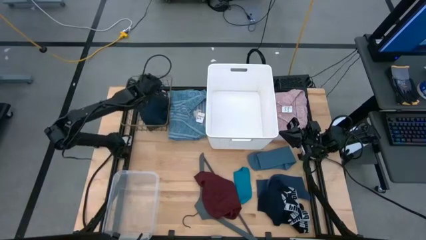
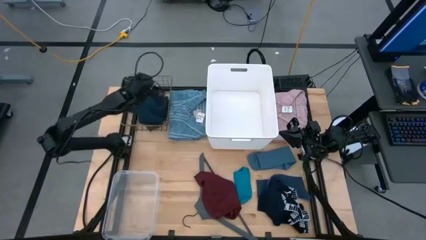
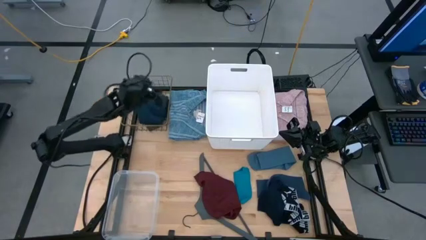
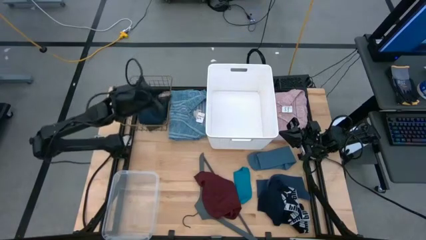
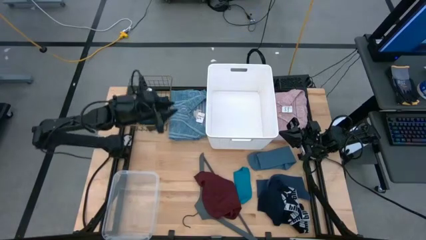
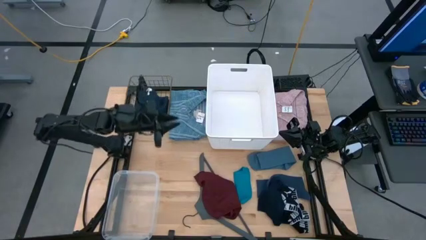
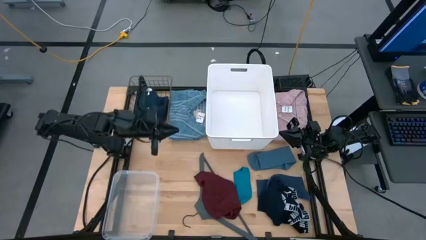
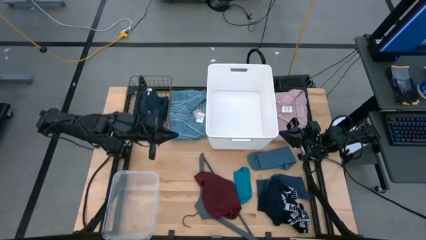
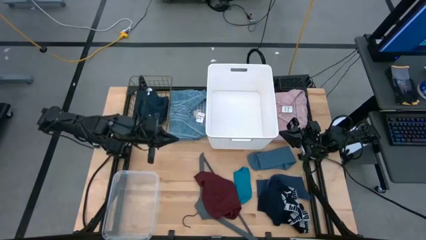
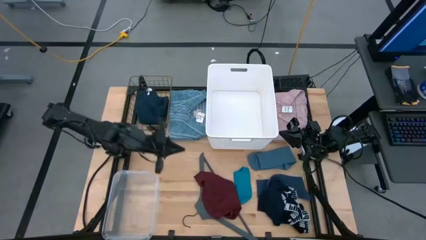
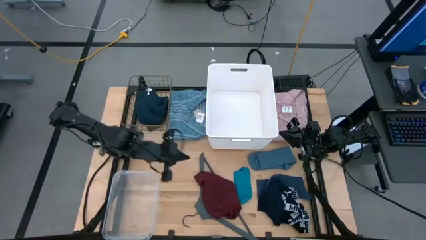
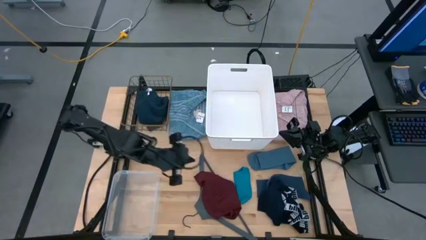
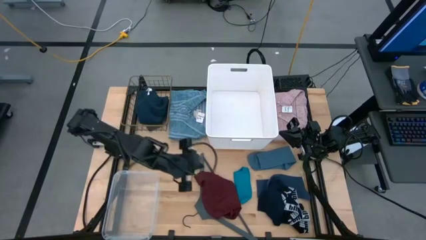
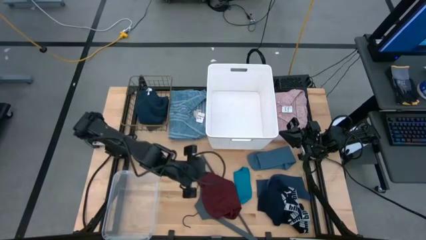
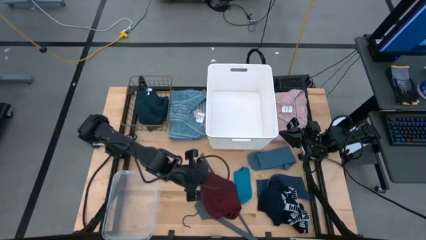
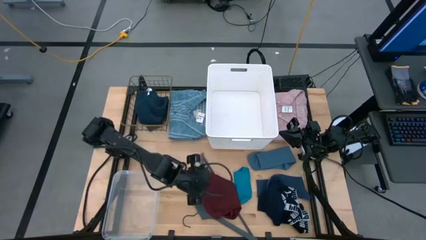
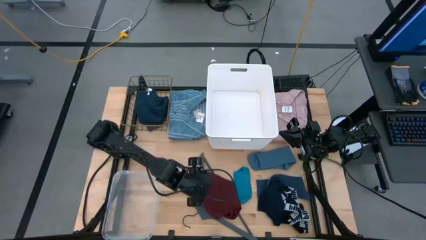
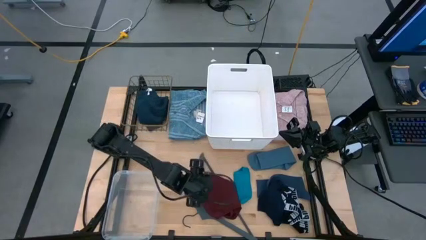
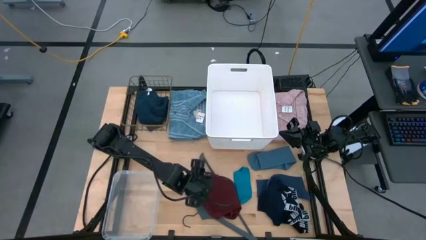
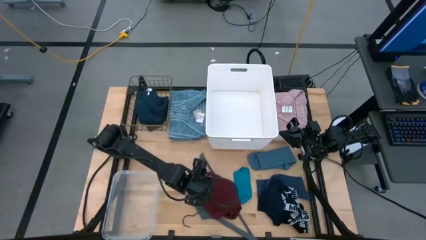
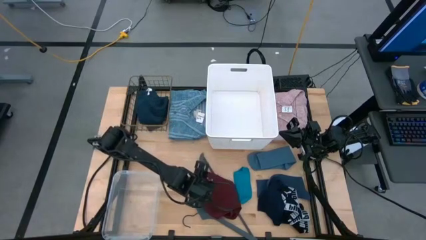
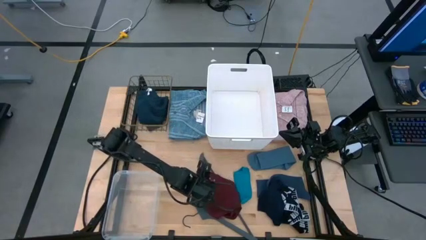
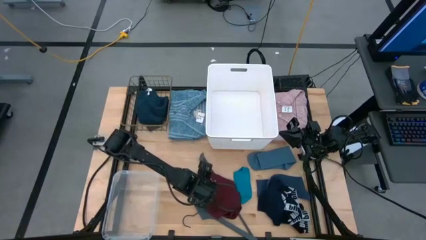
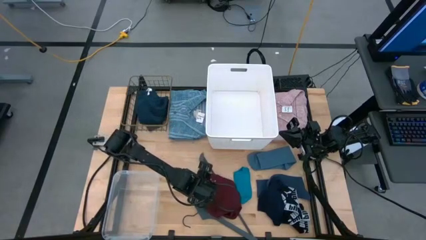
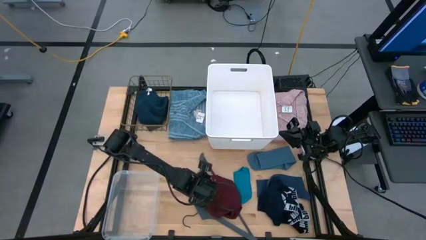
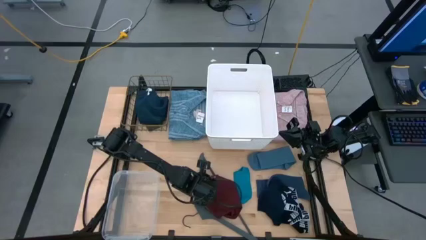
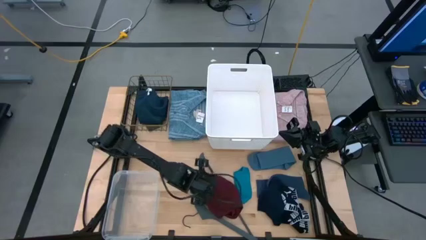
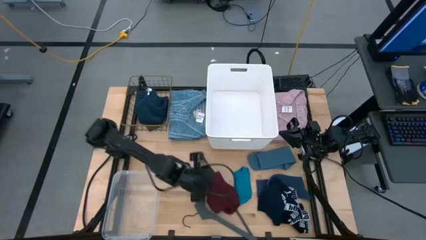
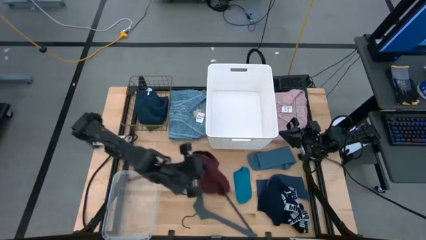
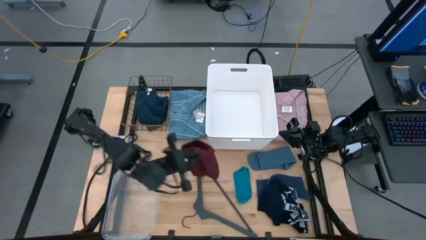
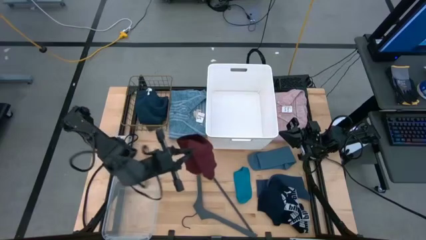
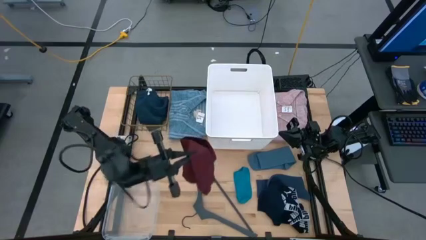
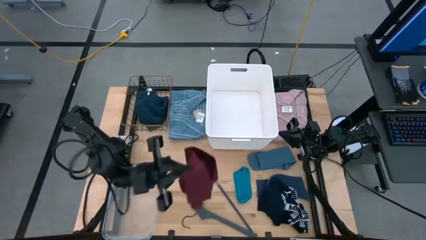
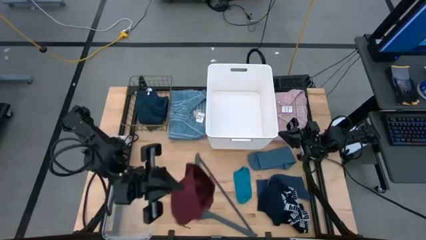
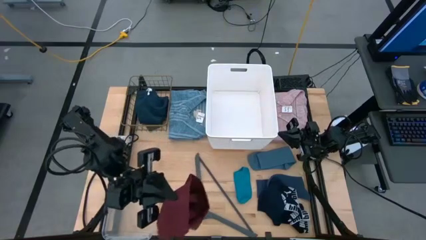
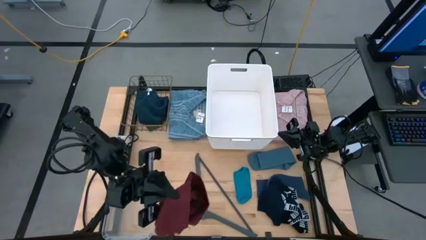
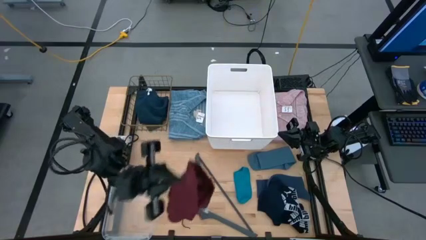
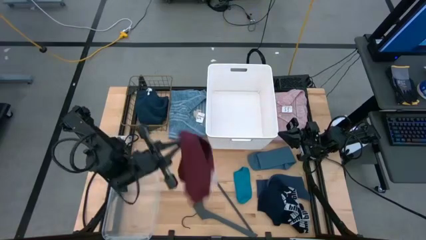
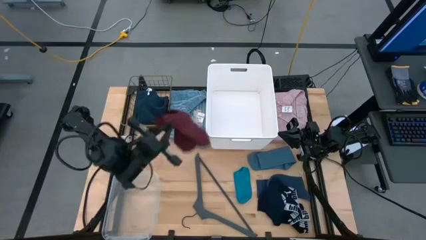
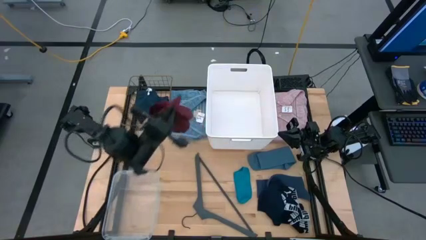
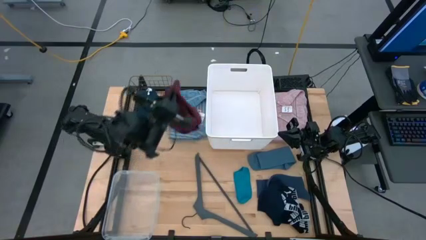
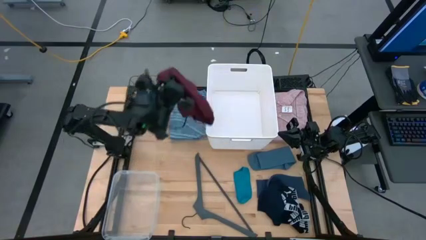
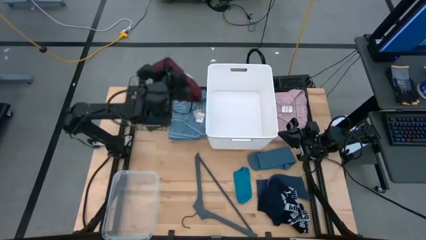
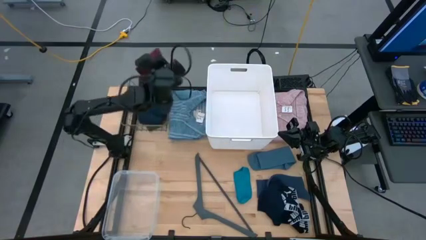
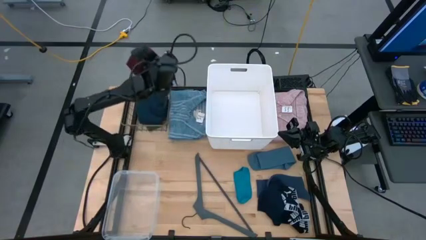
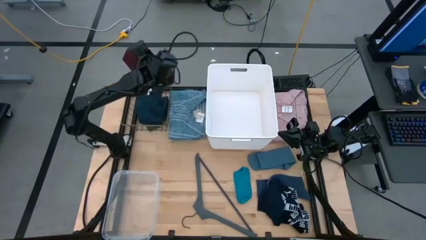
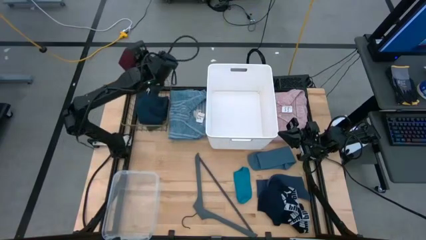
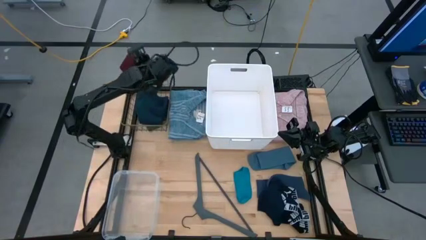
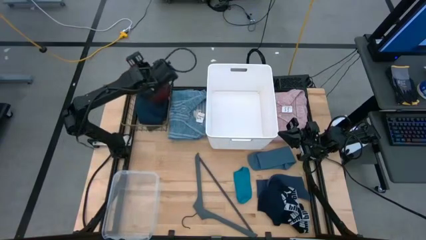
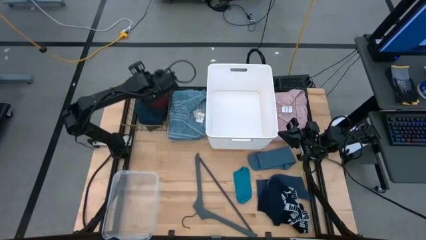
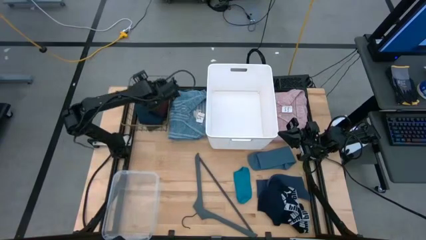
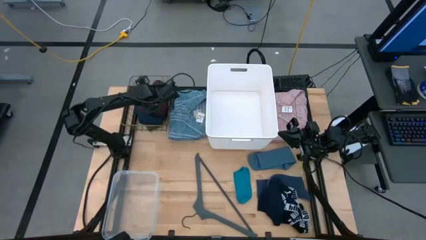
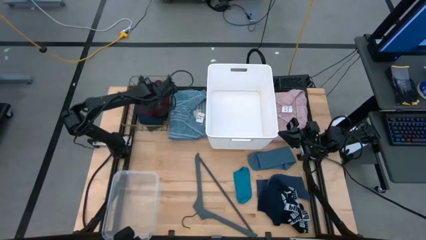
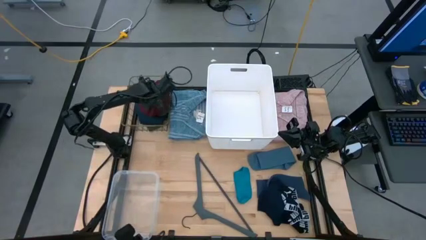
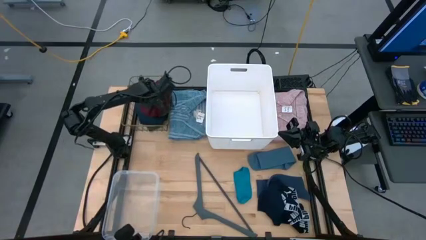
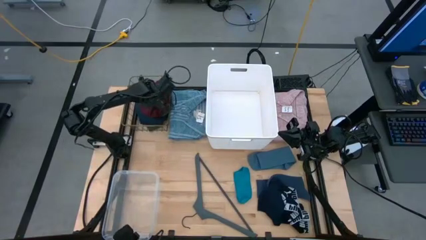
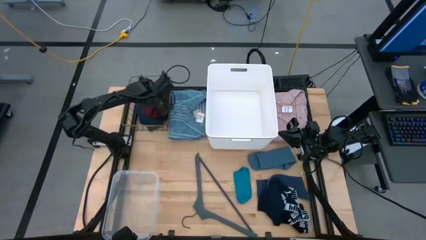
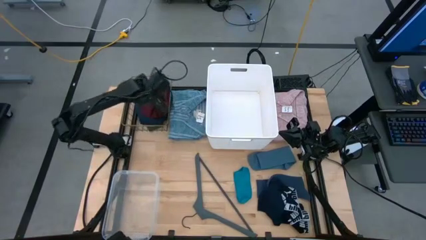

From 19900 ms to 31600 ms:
Task: Pick & Place Cloths
Put the dark red underpants into the wire basket

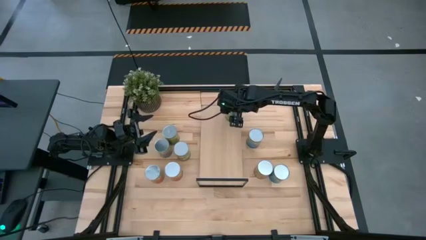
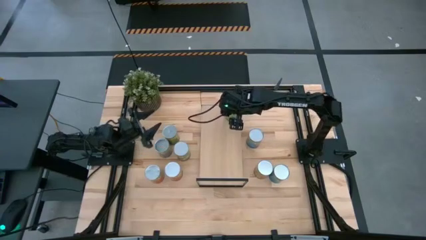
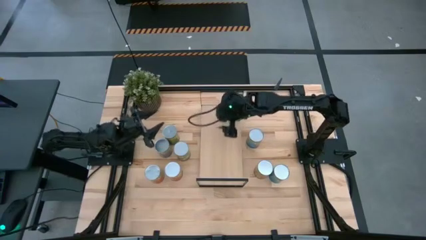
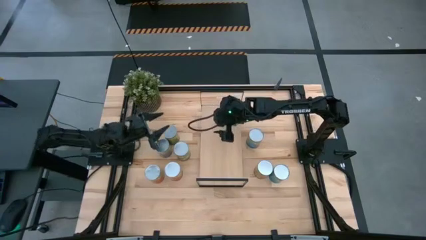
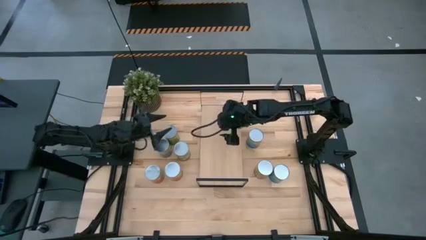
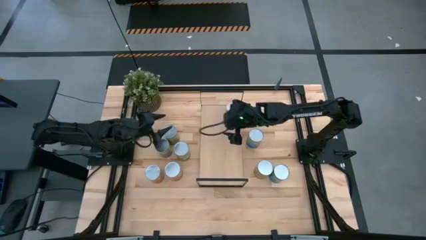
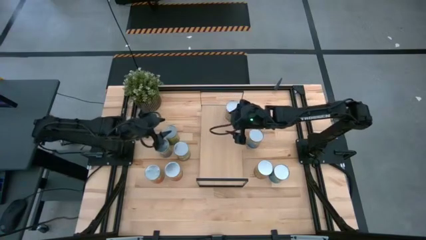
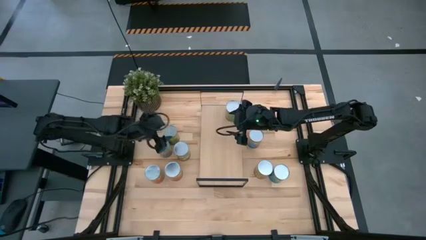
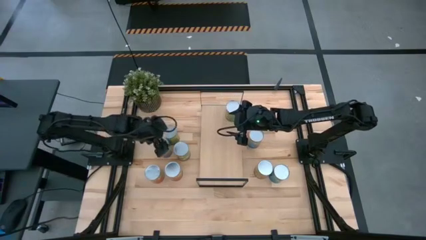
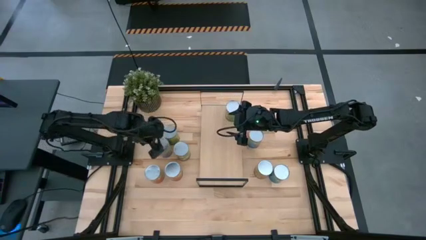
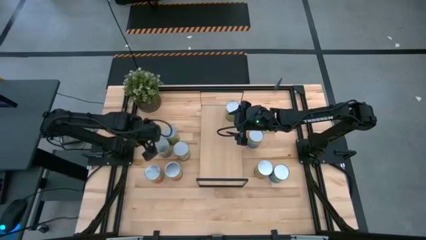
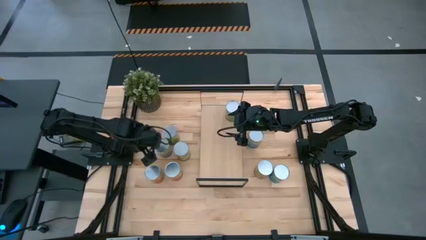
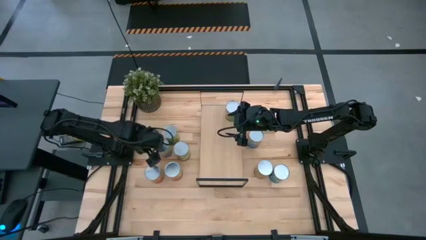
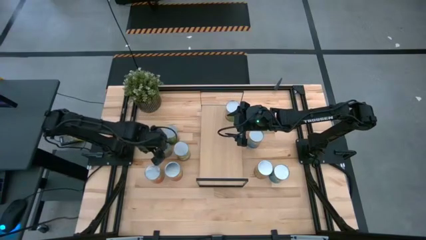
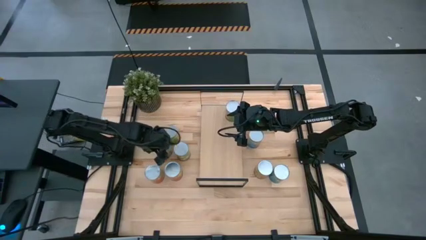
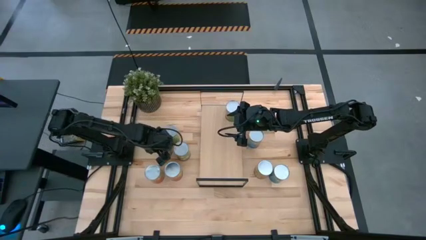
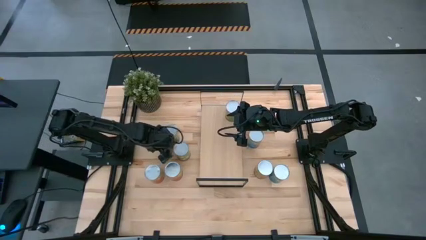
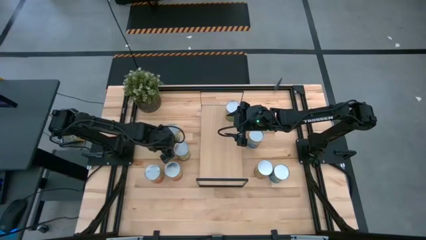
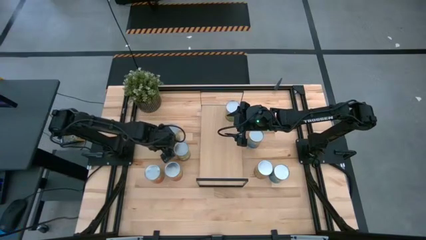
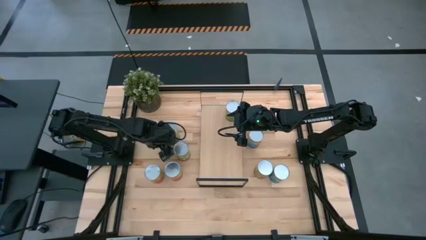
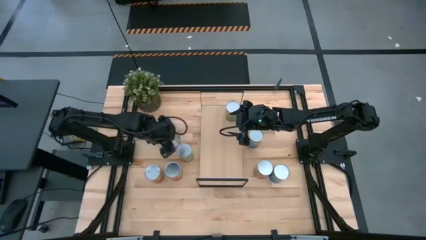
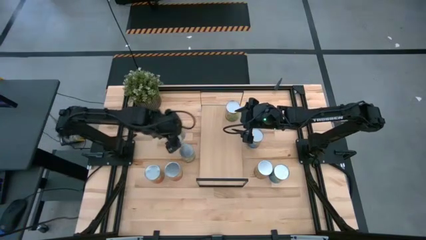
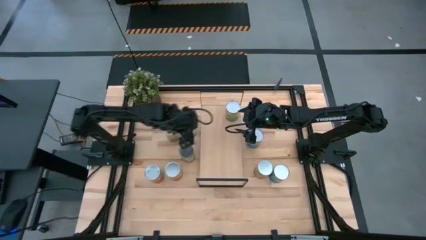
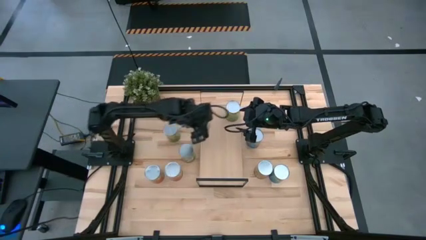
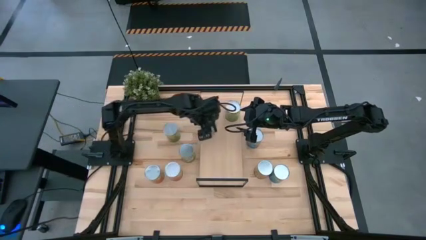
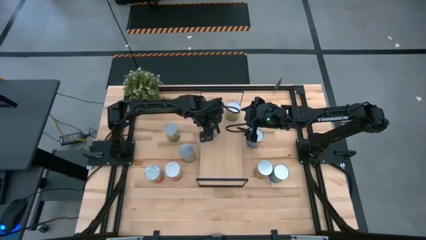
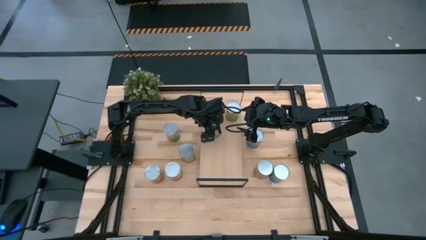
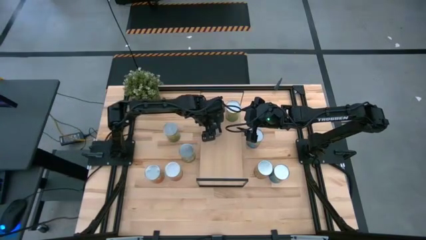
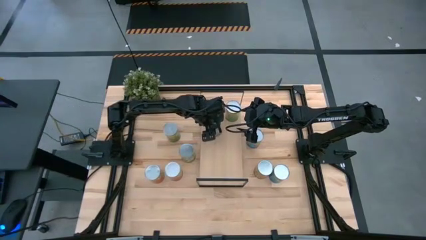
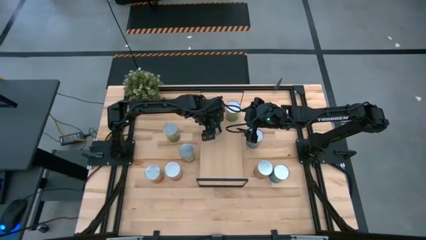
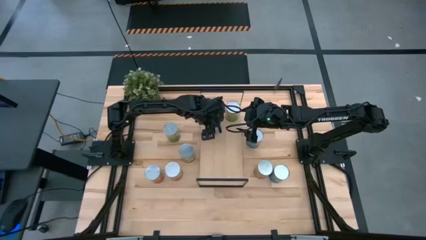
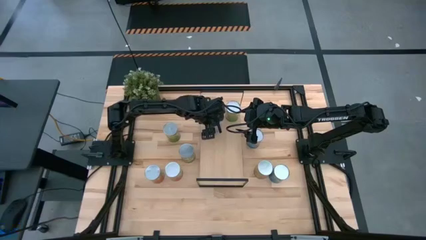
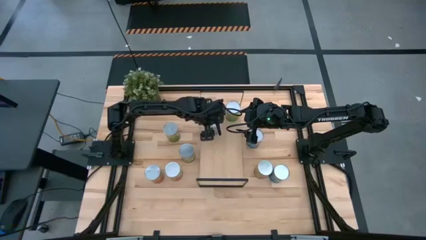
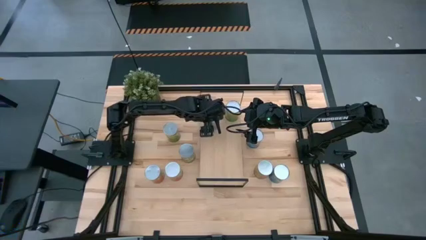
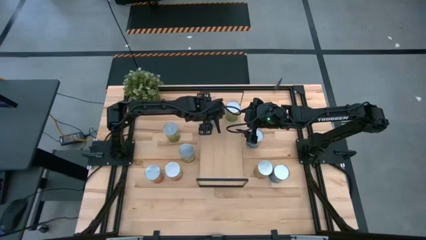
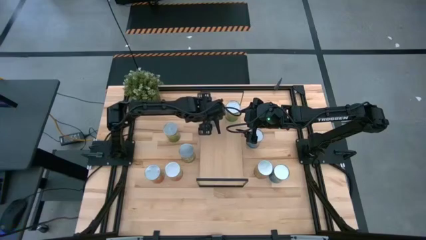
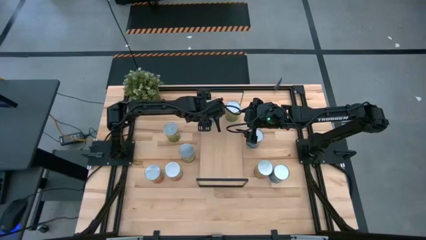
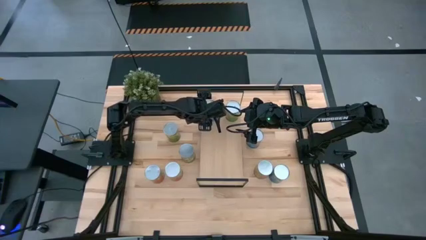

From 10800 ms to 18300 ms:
Task: Pick and place cans onto a shelf
Put the canned peaches on the shelf
